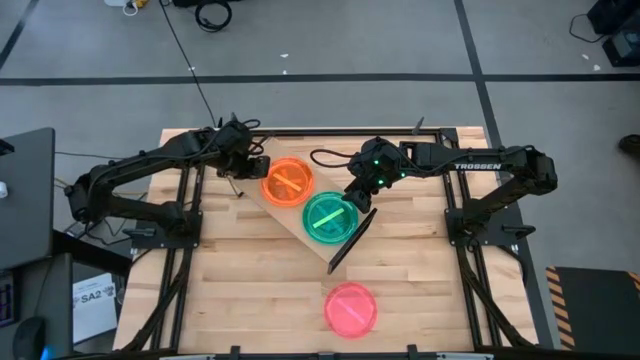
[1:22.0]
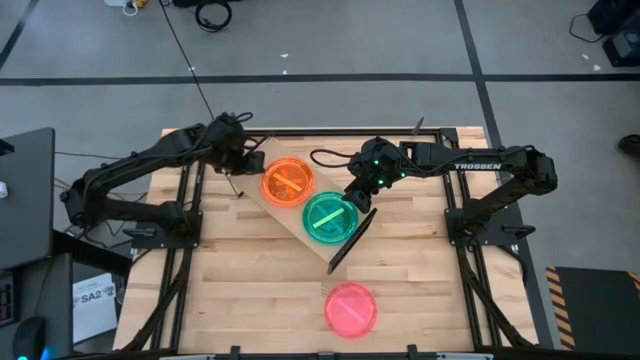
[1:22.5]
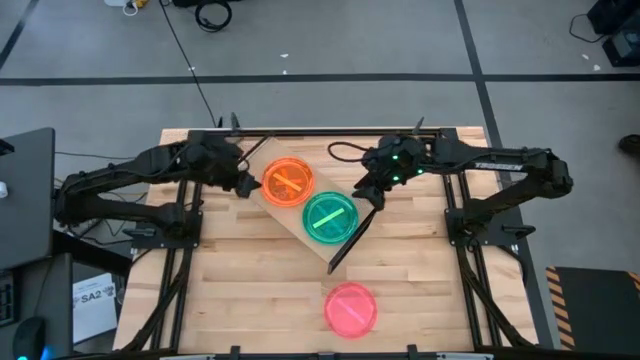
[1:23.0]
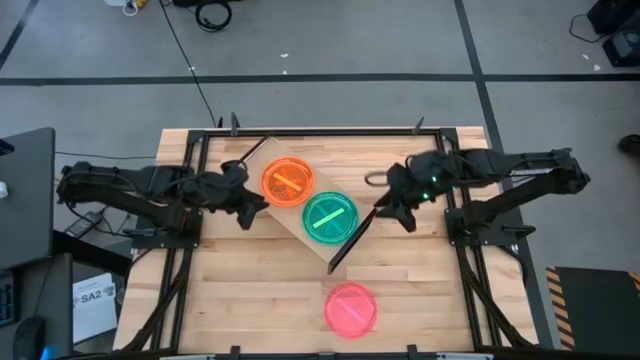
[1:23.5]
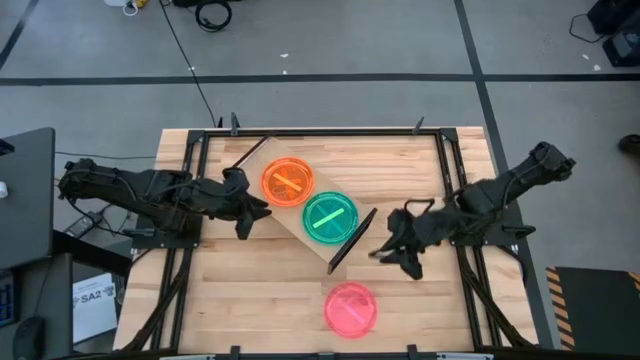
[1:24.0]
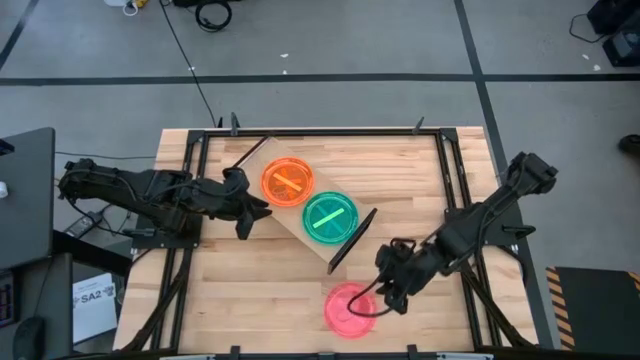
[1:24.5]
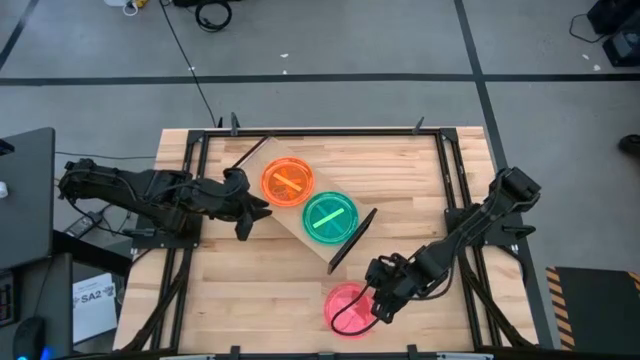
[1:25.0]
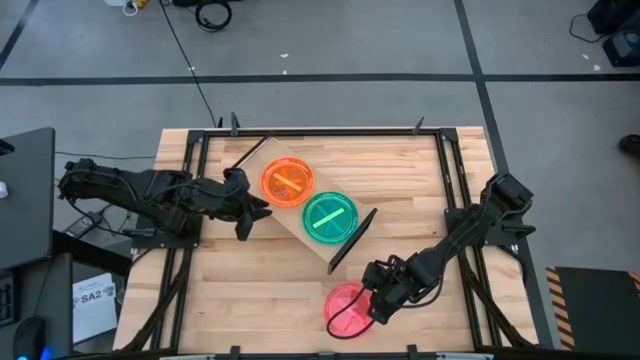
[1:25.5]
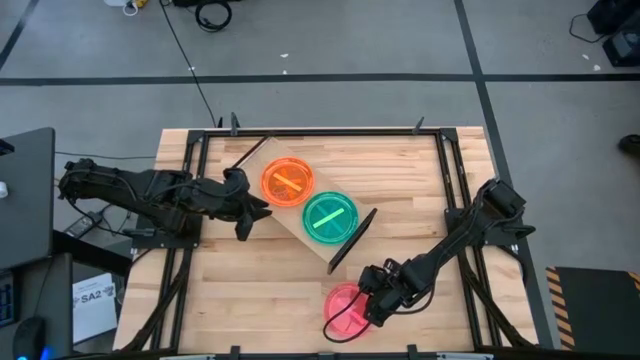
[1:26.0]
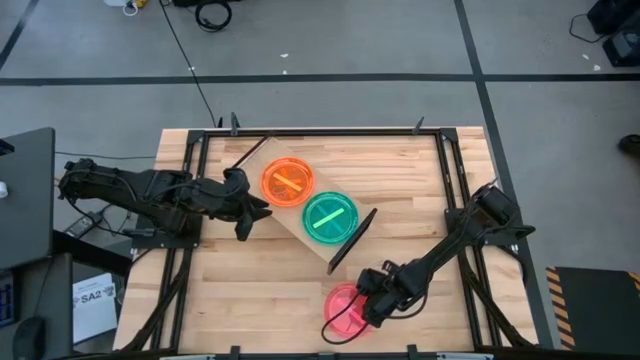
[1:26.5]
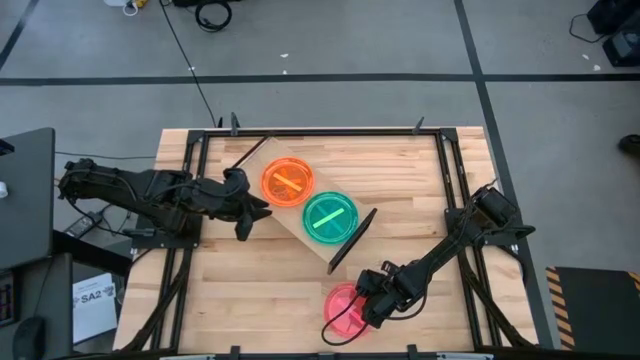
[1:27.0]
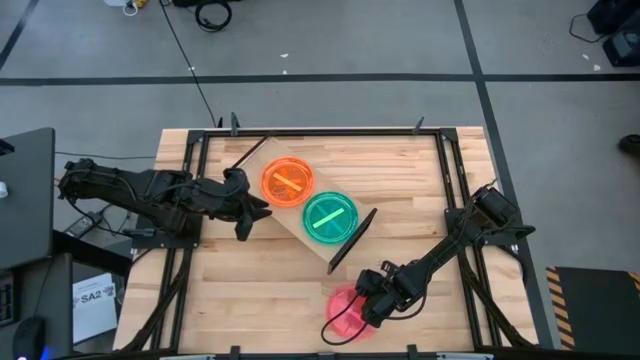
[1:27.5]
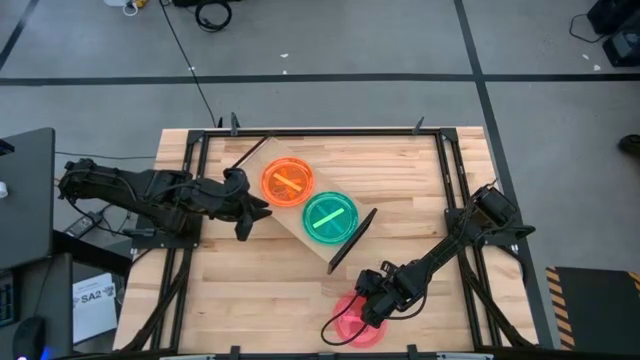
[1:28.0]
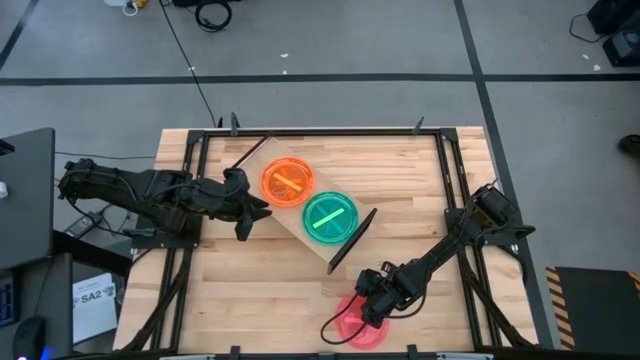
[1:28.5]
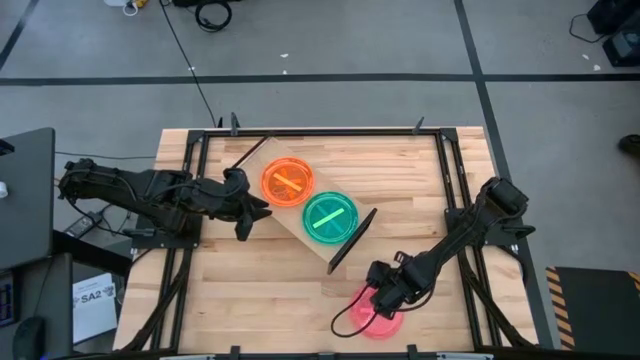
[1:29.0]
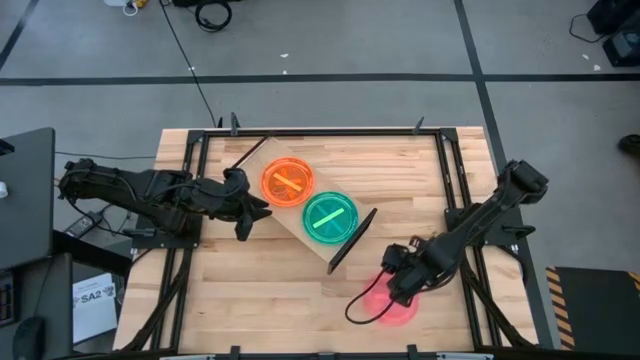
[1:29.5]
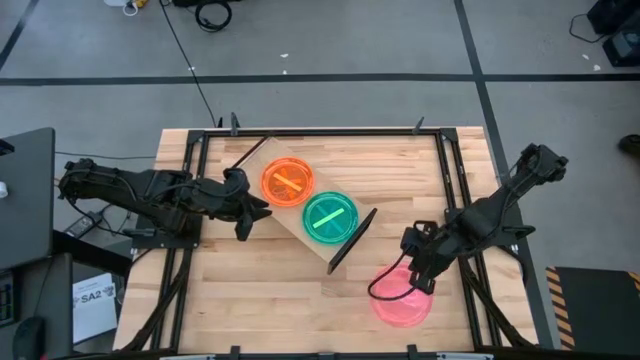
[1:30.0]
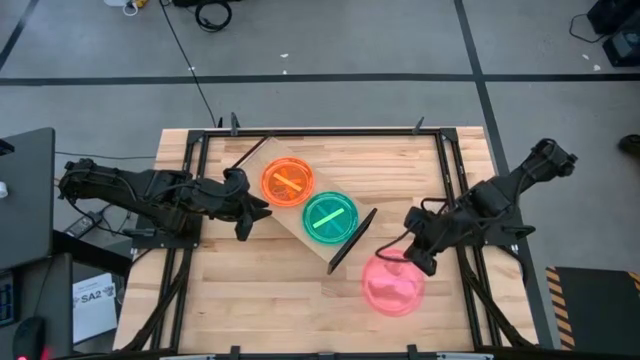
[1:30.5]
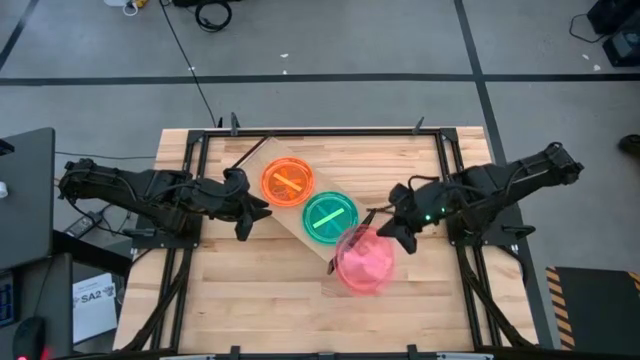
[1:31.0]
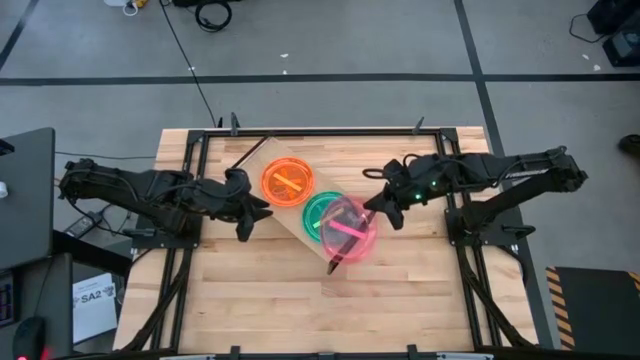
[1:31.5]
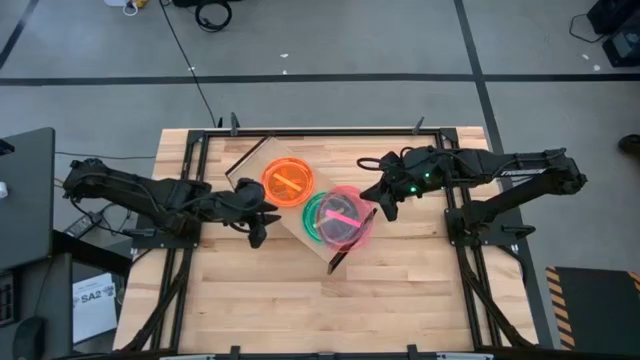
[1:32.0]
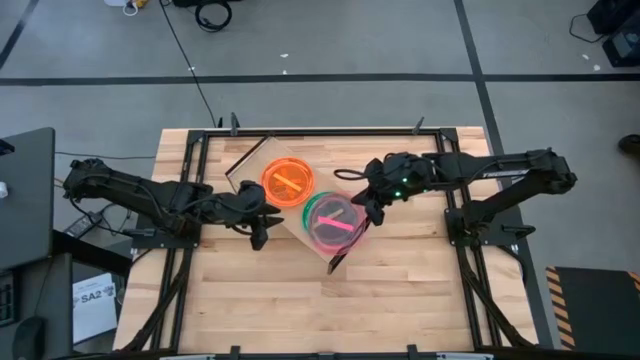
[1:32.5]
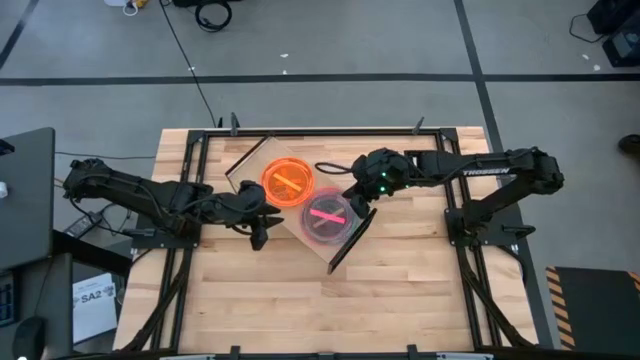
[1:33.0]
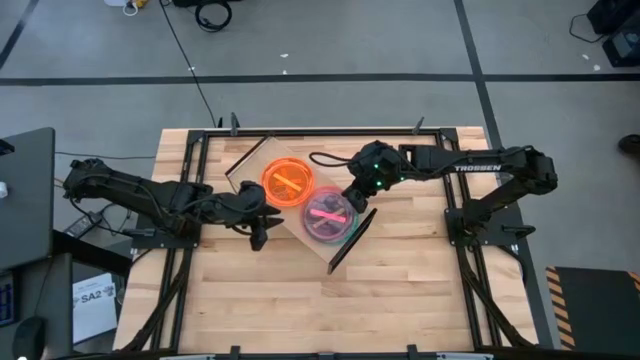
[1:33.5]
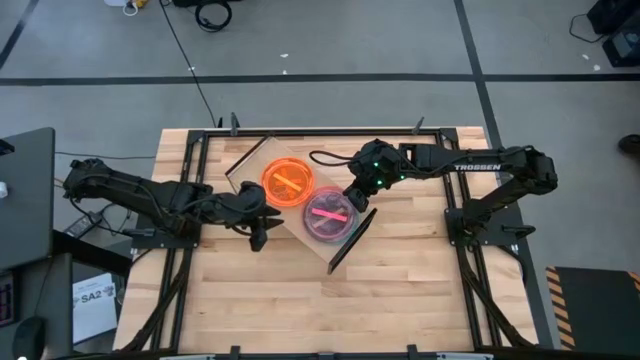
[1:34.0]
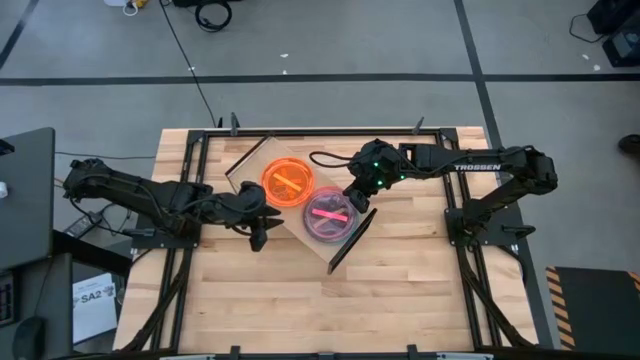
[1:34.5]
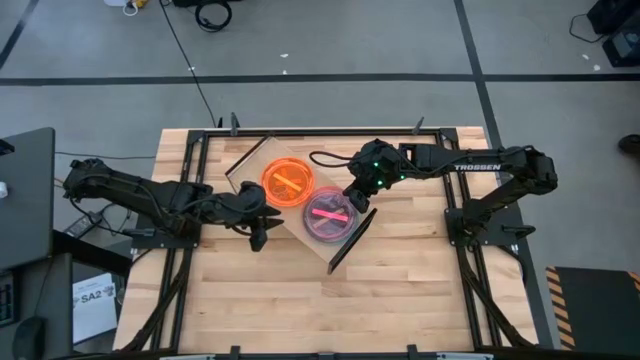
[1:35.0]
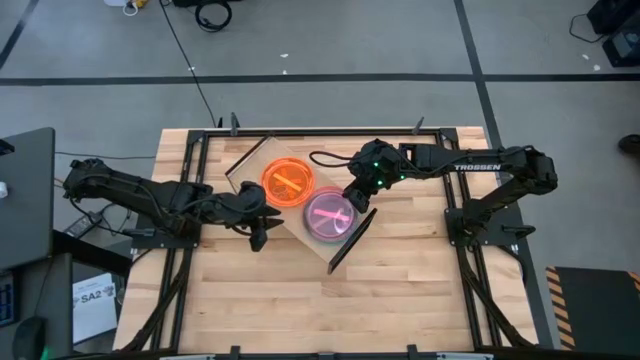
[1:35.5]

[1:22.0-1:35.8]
Task: Place and stack plates onto a shelf
Stack the pink plate on top of the green plate on the shelf

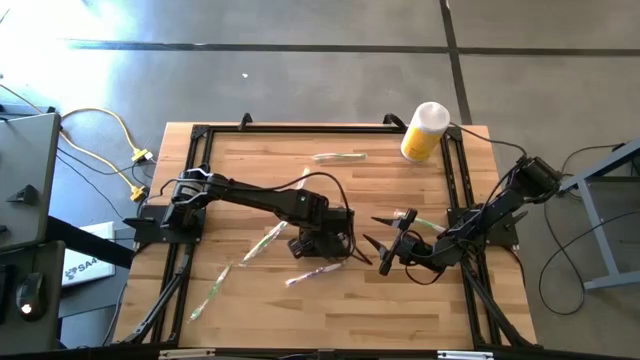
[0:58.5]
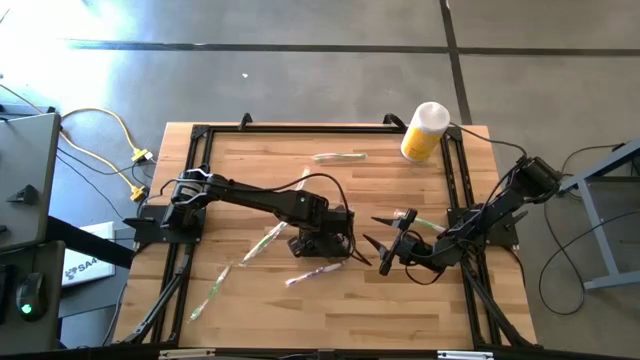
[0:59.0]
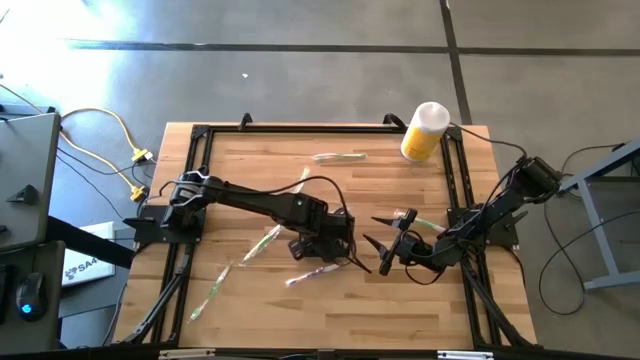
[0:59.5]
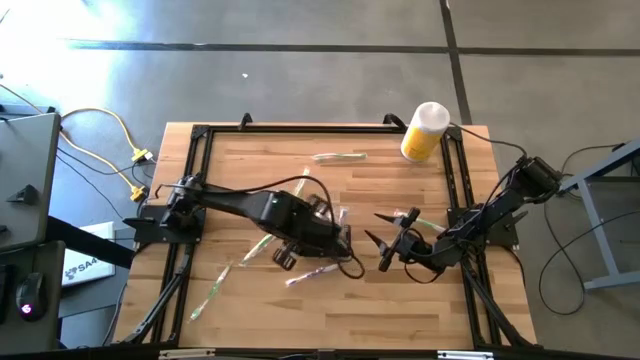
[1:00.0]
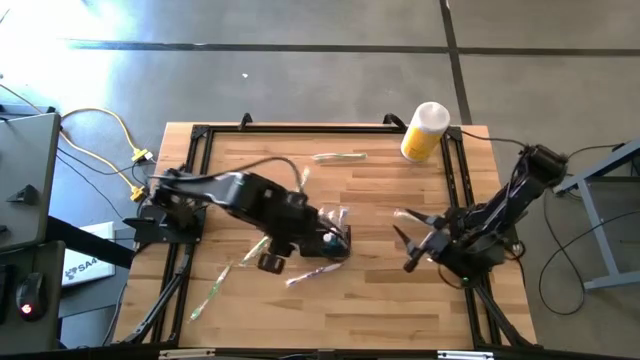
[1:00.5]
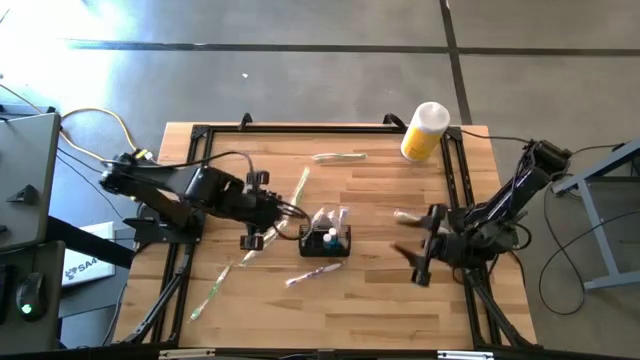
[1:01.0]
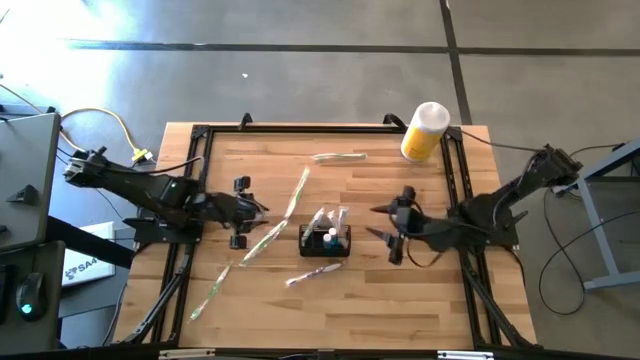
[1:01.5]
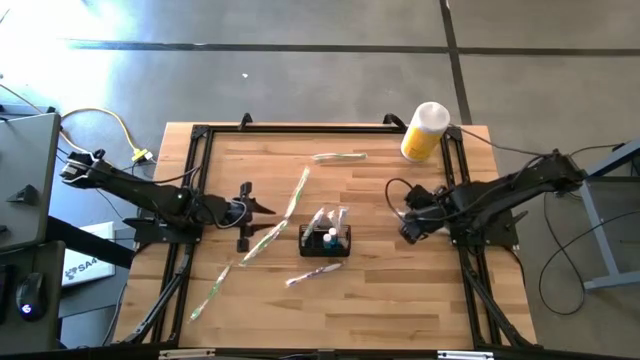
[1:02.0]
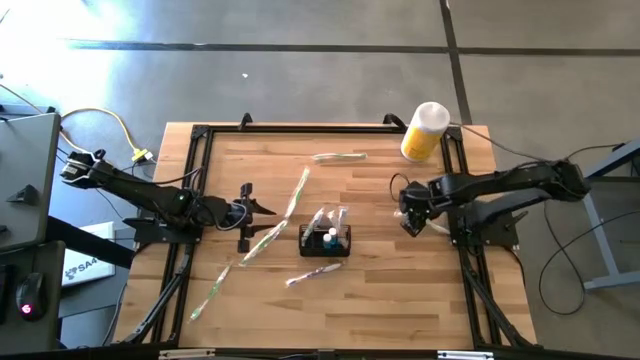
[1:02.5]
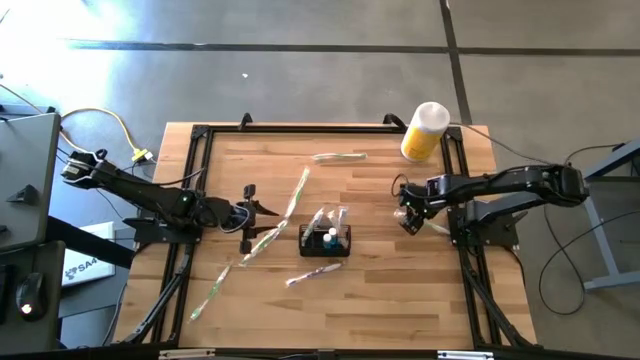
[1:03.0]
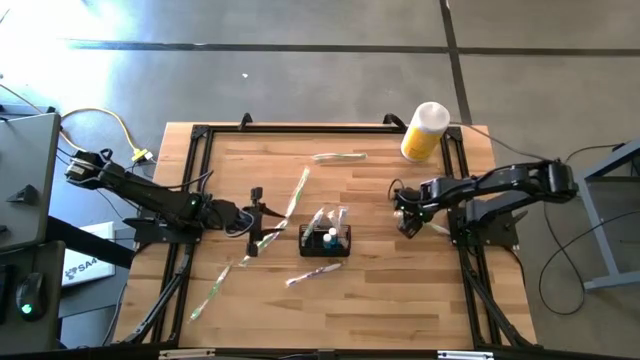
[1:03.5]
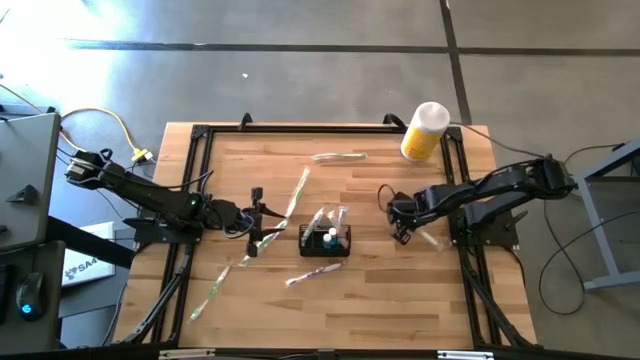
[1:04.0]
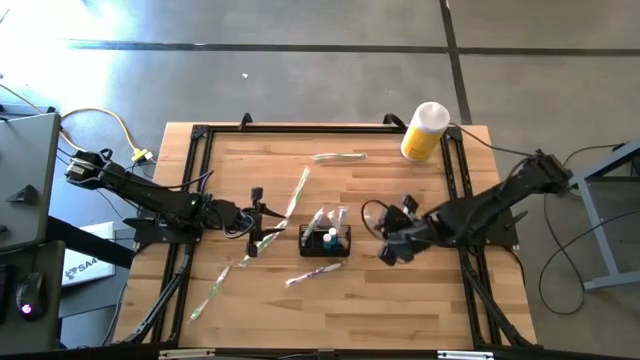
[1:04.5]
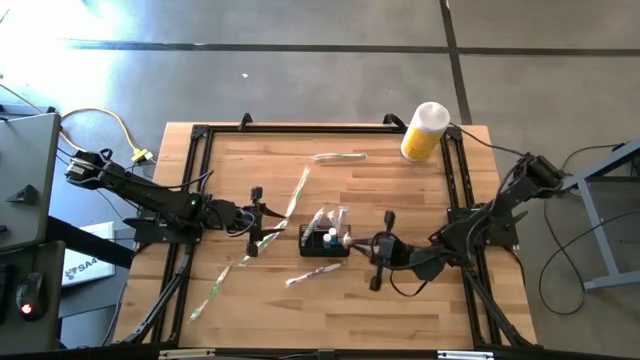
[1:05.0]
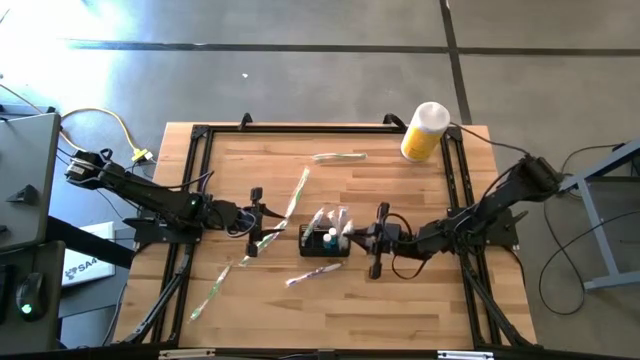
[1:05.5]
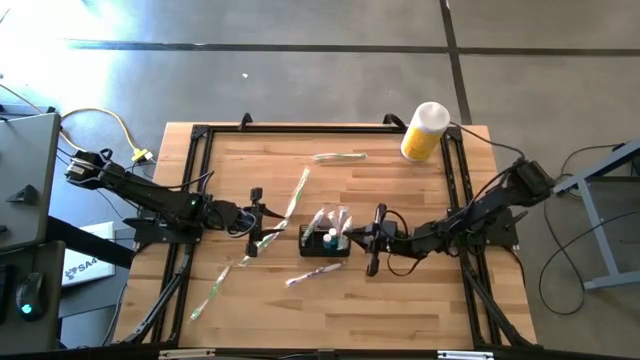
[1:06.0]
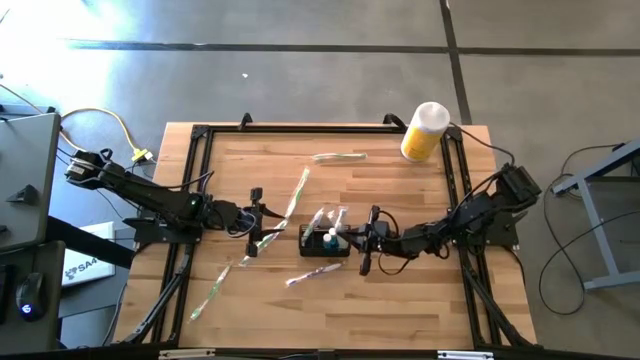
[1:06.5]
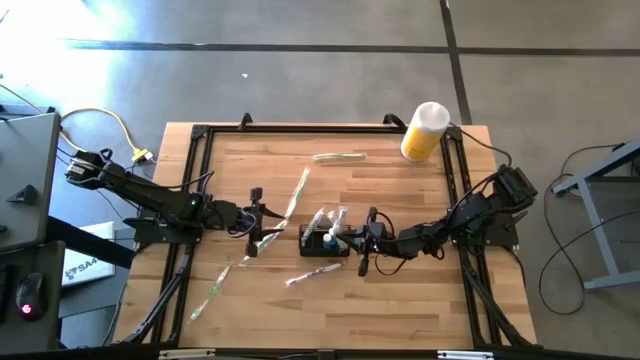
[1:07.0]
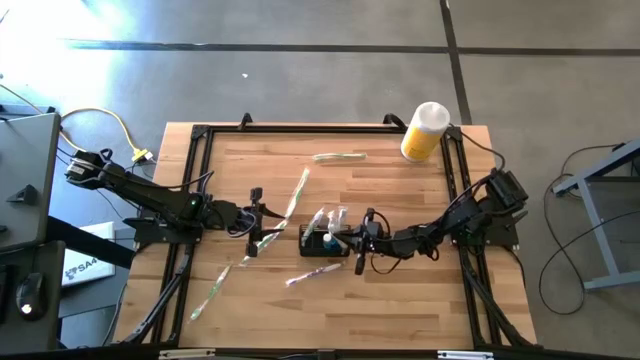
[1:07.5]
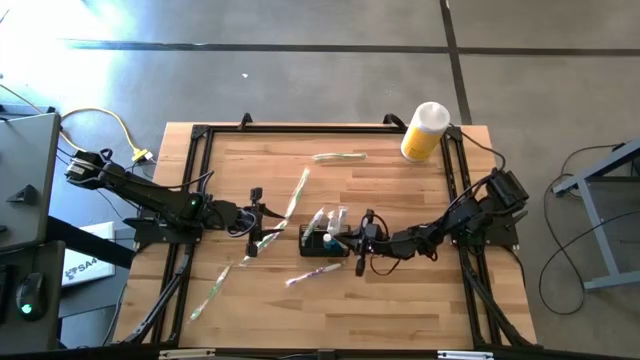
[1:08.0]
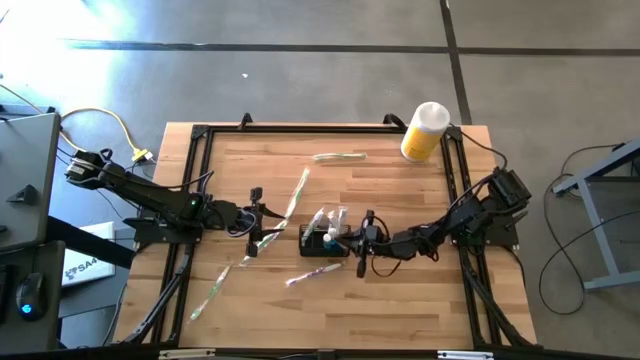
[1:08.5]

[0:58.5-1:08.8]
Task: Pick & Place toothbrushing station
Put the green toothbrush into the black wire organizer
